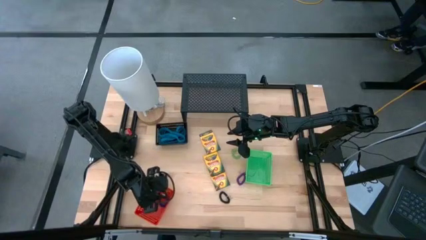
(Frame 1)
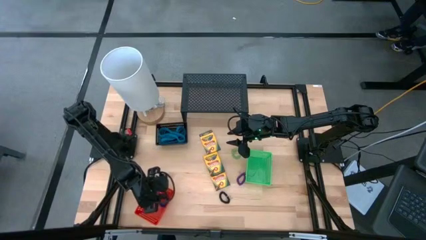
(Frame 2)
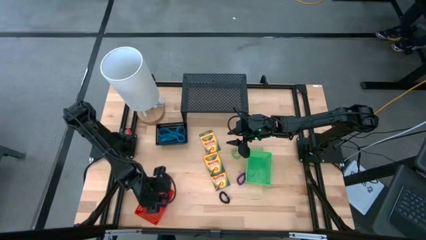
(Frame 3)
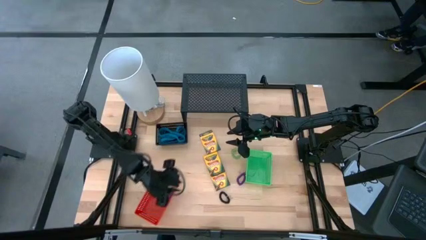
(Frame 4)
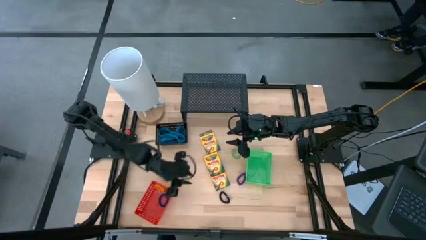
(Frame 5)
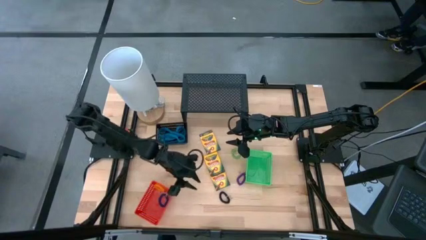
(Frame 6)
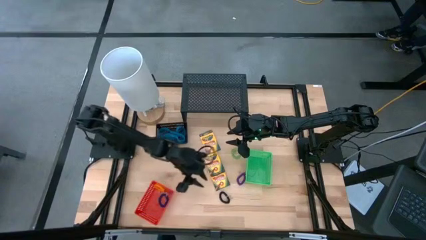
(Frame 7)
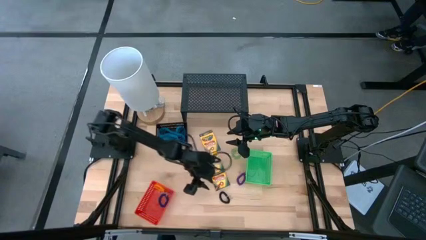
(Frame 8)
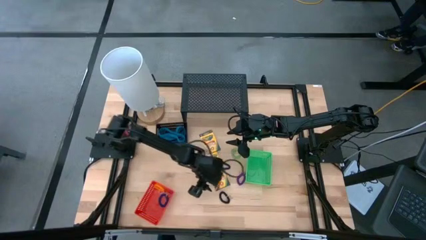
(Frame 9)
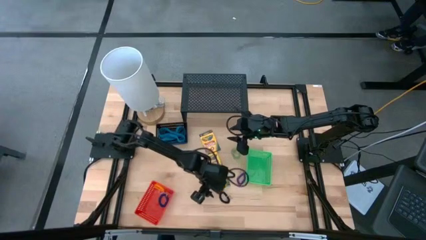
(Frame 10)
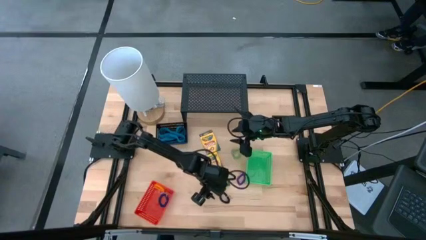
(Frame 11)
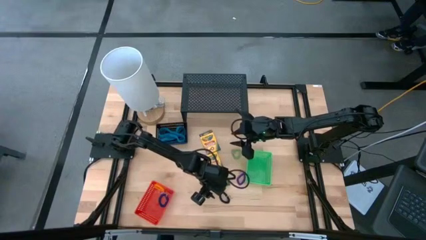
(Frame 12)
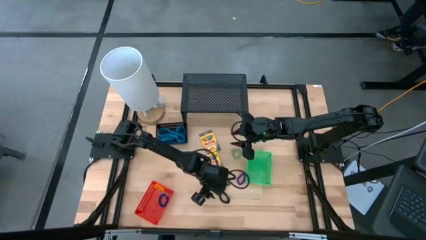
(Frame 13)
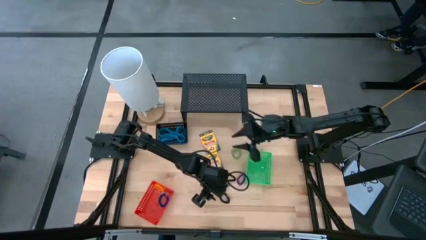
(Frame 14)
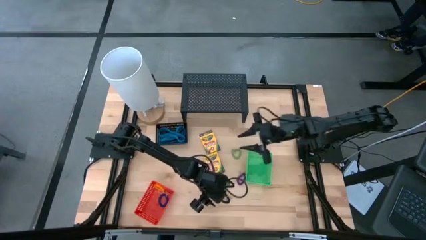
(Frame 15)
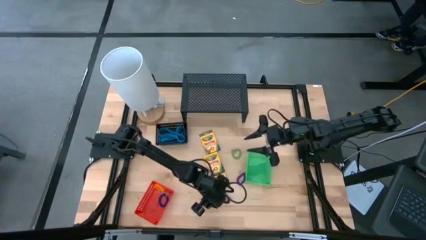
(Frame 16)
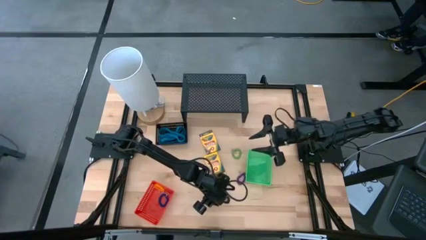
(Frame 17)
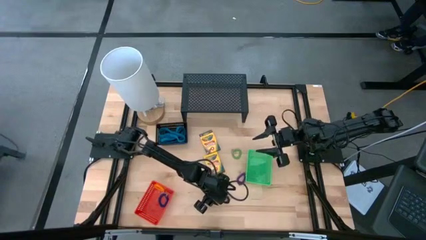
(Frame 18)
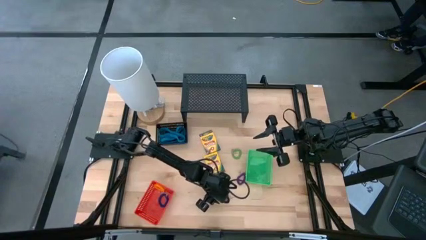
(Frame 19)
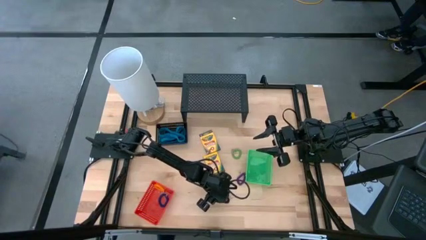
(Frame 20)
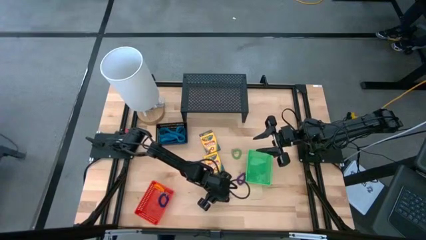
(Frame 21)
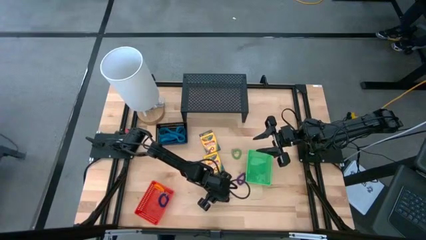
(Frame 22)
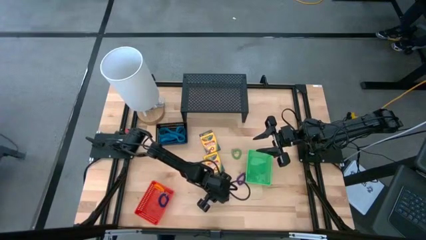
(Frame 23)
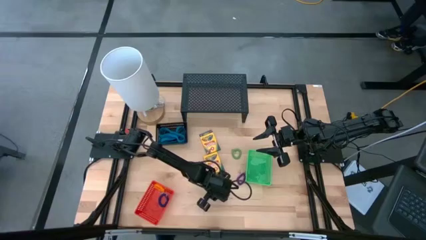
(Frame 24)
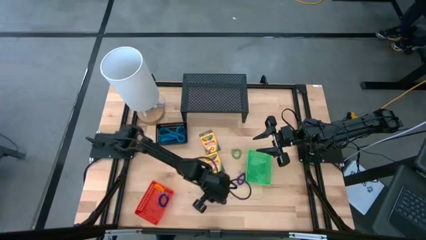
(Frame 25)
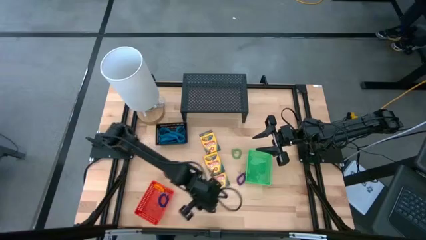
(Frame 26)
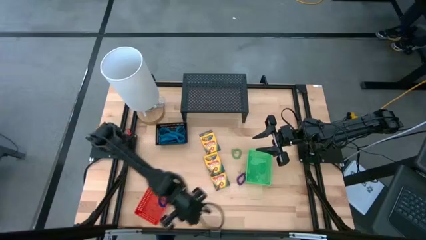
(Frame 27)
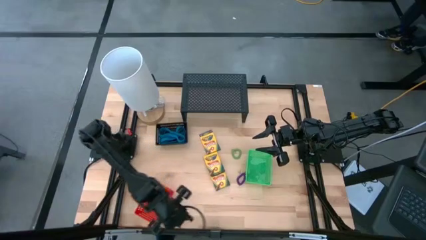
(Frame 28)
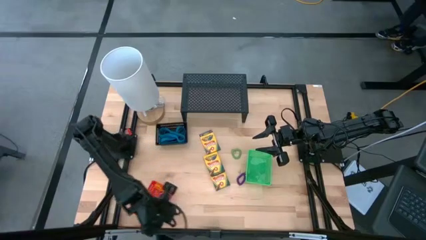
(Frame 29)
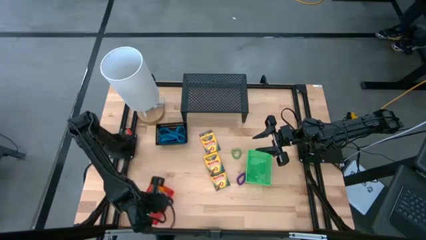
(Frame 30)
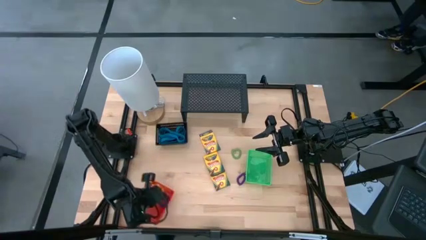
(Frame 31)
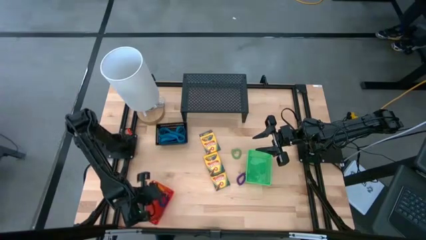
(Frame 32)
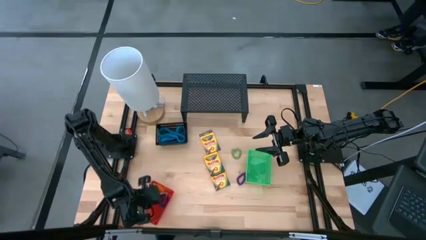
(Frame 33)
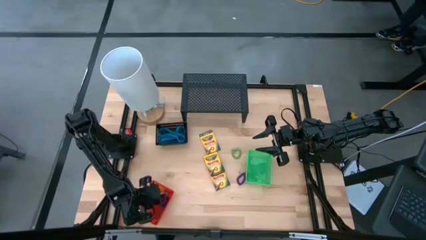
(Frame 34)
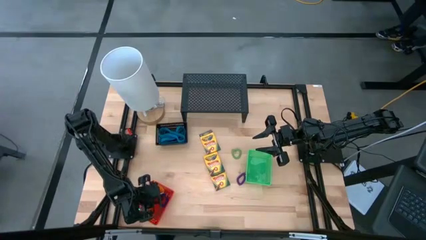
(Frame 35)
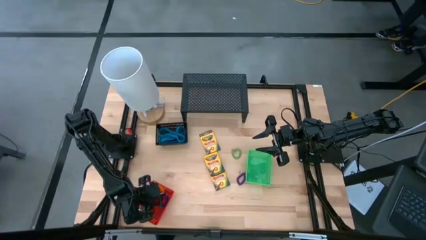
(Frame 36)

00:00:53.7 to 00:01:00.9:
Task: Pick & Place Office Desk Supplies
Put the black spring keychain into the red bin

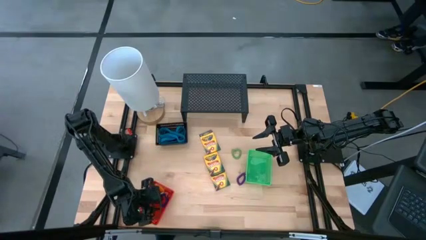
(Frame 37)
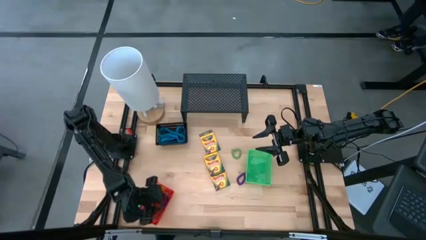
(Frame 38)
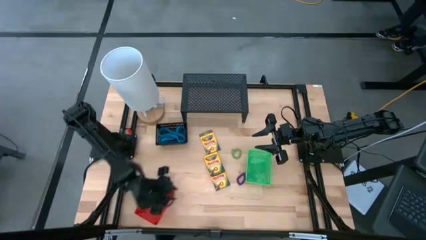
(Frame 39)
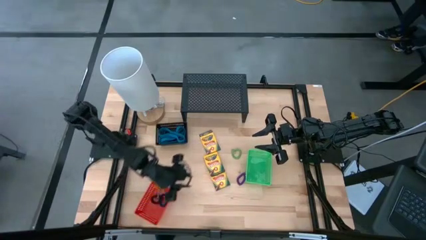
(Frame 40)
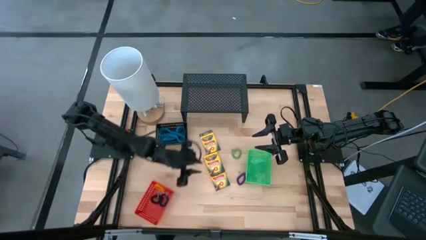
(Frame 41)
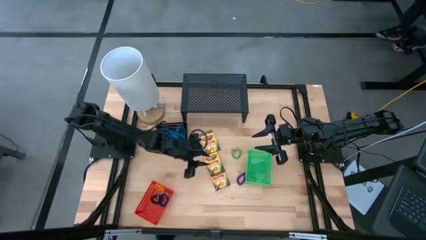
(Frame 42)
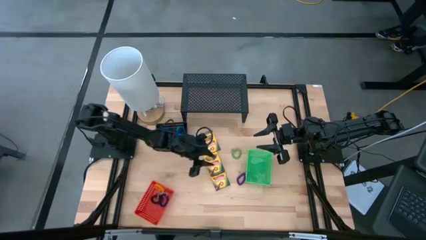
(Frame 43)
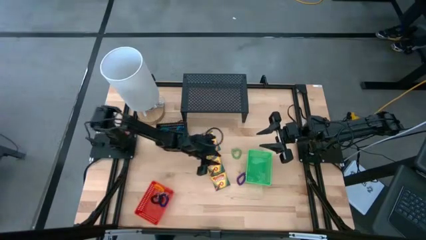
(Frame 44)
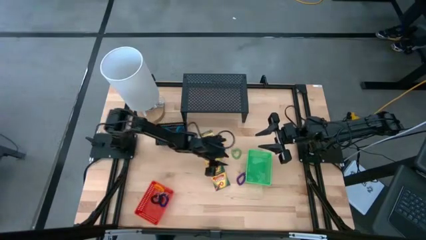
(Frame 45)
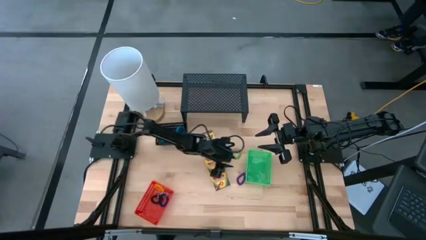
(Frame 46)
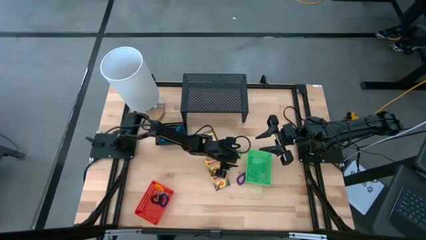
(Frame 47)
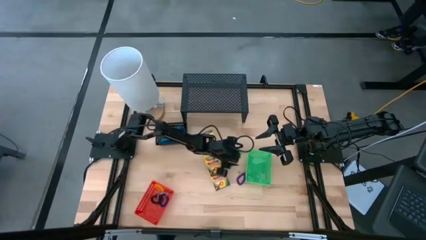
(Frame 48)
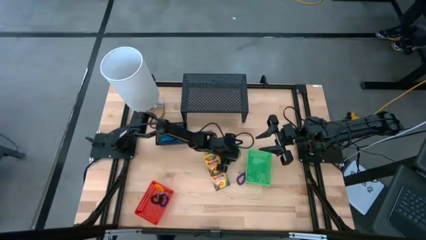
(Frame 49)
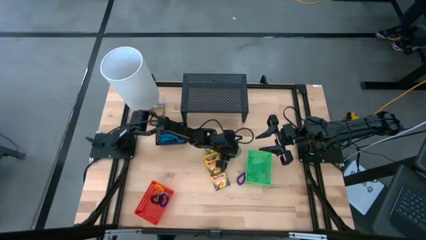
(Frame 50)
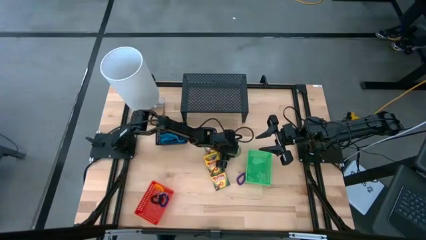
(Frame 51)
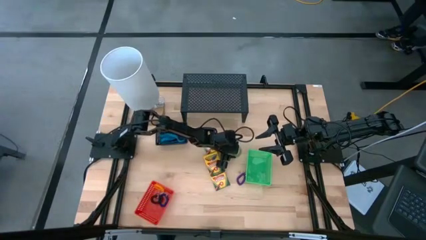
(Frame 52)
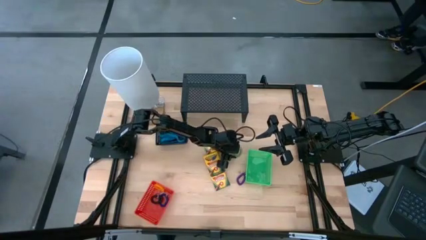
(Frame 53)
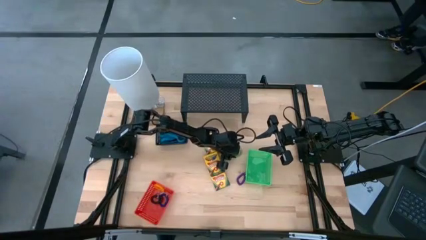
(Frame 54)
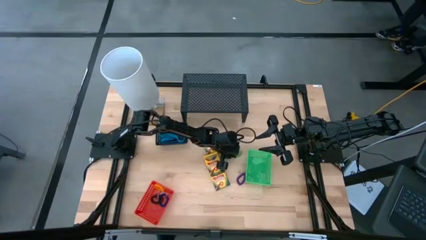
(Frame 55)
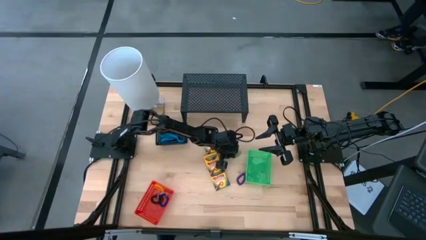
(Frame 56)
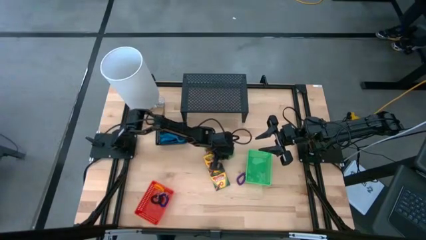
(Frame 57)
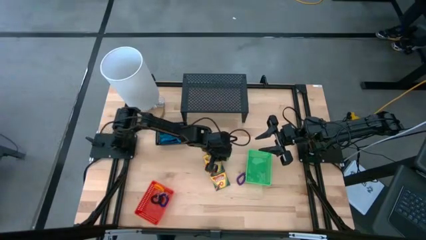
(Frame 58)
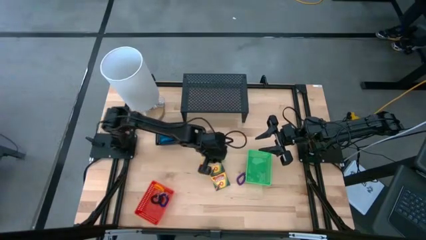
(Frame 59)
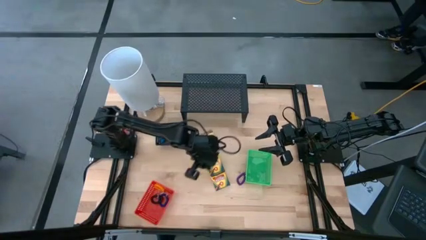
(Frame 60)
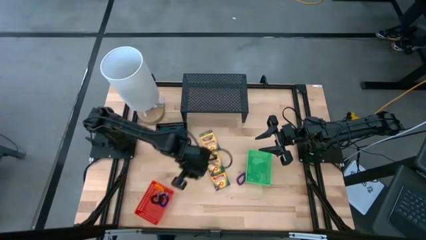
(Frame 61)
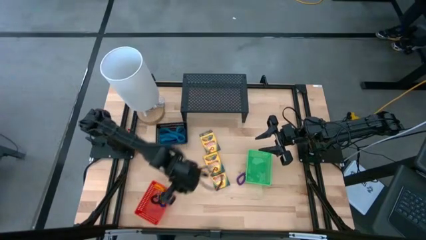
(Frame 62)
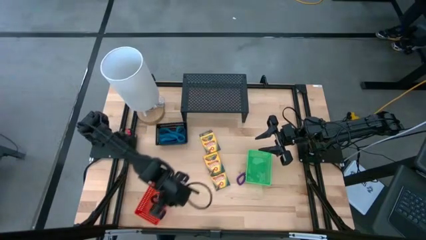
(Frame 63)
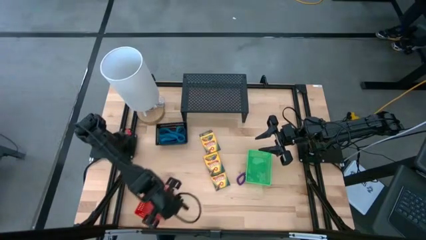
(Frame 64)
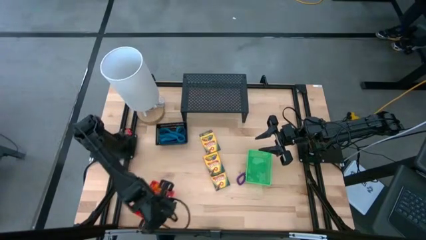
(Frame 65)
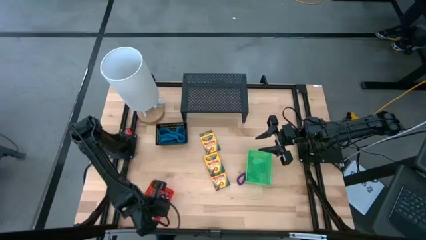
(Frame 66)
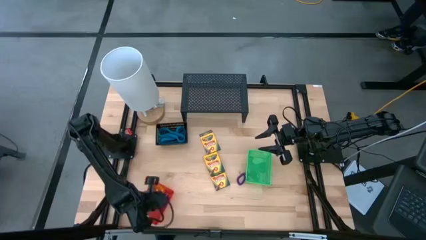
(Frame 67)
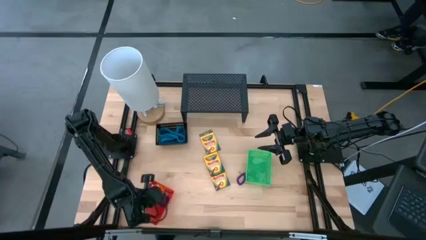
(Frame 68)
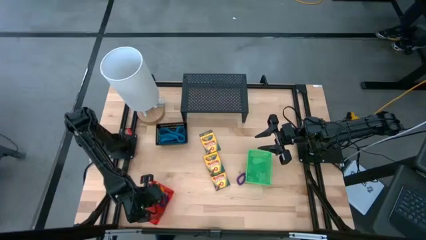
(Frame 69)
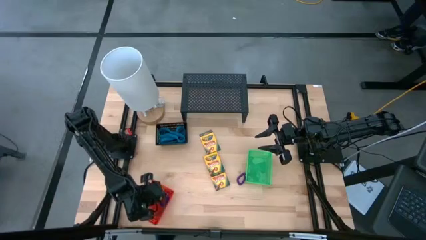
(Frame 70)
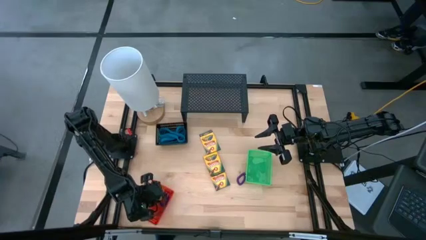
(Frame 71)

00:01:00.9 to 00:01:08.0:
Put the green spring keychain into the red bin

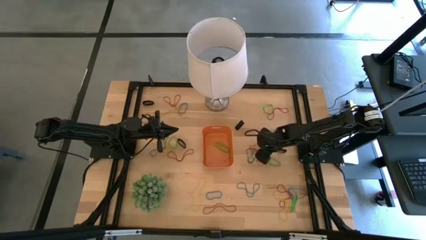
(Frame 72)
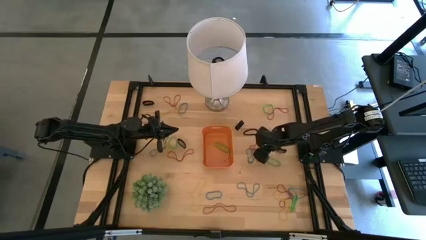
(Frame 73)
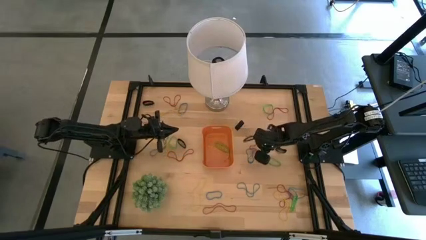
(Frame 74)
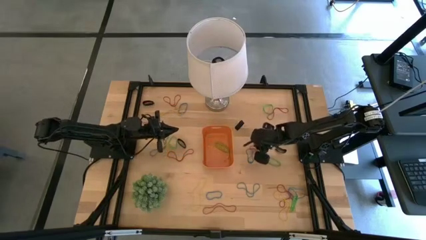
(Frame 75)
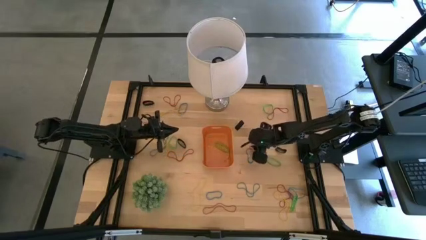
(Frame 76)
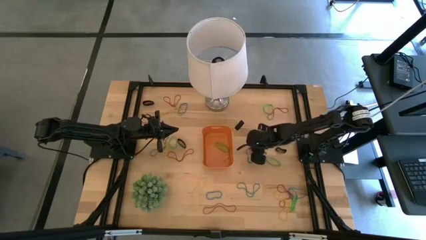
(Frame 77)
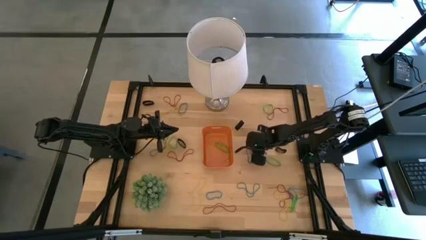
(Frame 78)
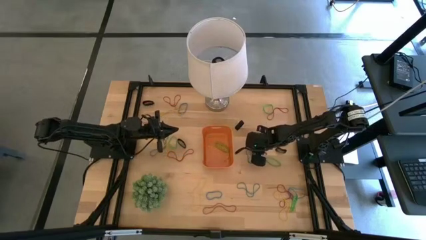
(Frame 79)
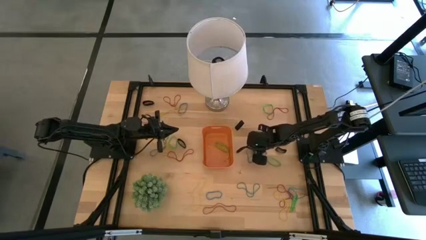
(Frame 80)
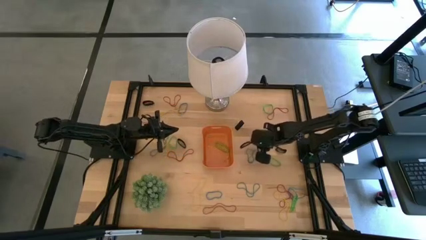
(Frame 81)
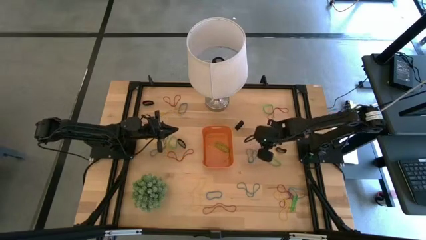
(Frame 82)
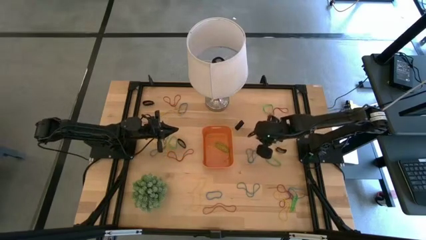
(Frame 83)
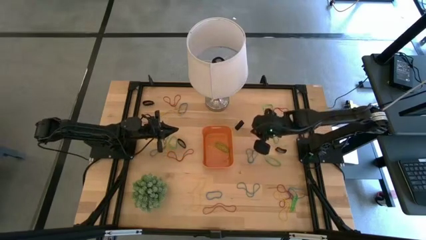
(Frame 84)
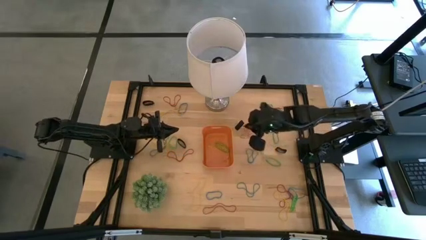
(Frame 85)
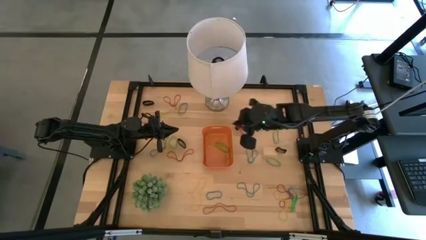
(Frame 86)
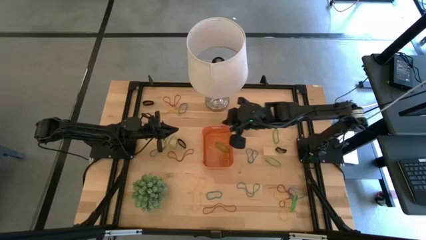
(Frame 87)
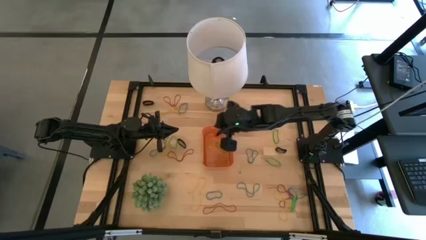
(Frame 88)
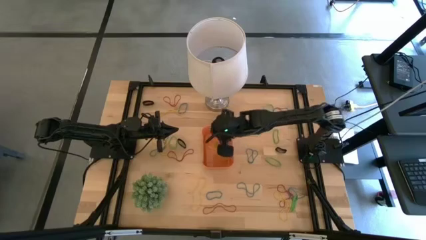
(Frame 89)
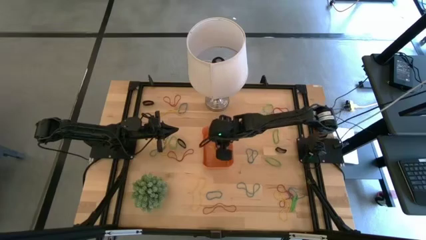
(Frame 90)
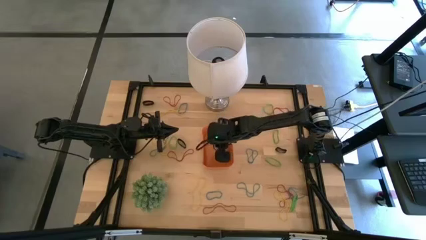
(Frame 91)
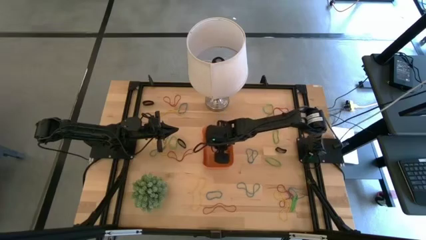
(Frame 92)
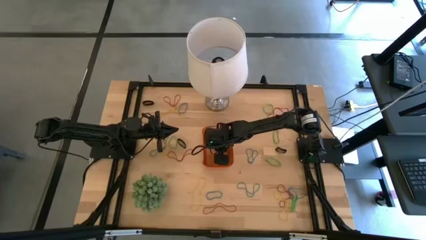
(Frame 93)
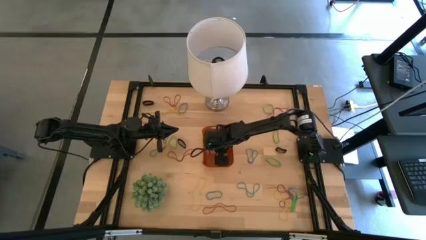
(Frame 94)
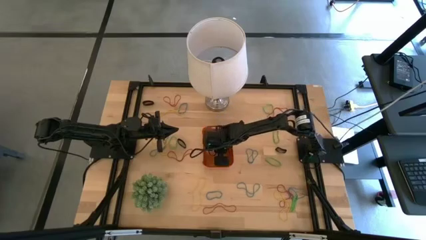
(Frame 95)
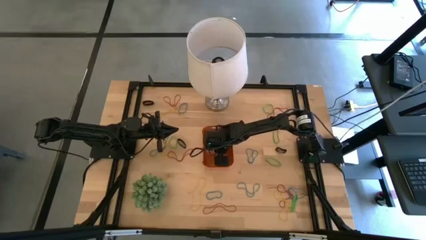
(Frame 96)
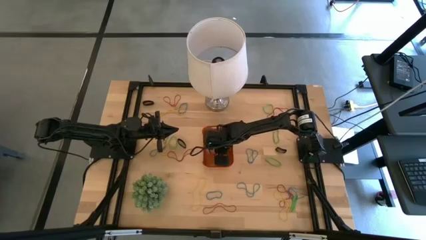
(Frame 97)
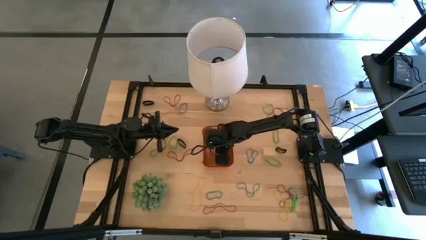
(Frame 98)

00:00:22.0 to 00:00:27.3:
Task: Pick and place rubber bands into bin
Put the red rubber band into the orange bin
